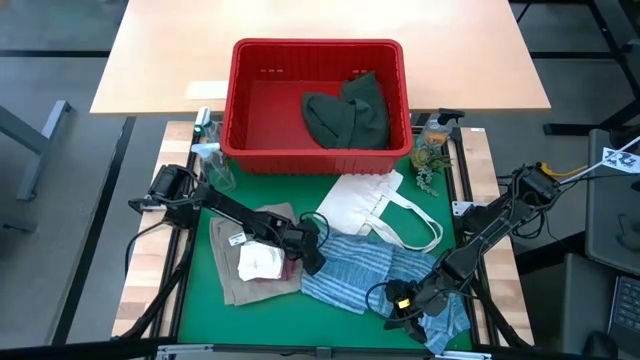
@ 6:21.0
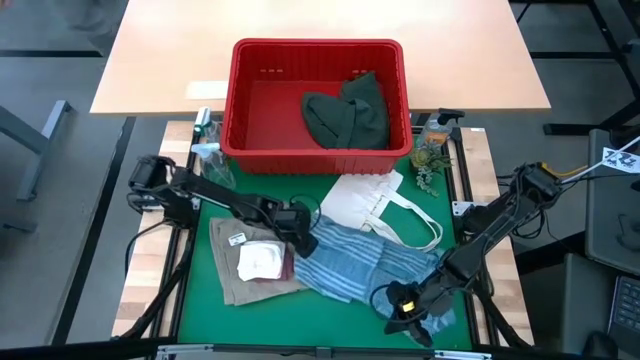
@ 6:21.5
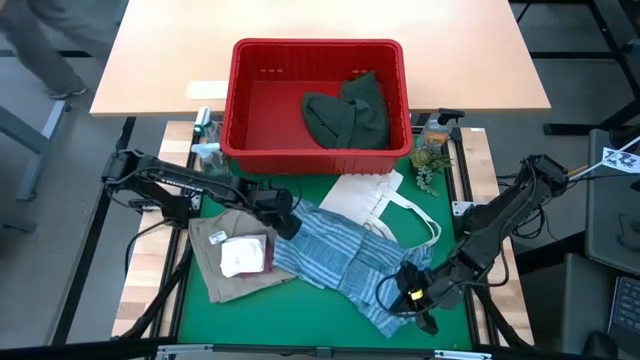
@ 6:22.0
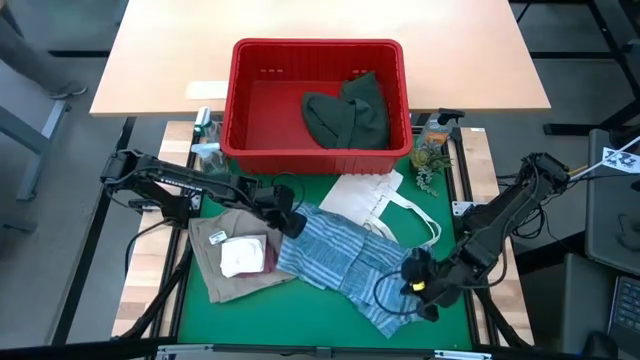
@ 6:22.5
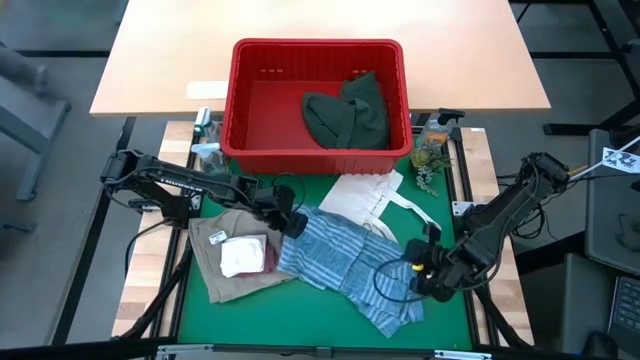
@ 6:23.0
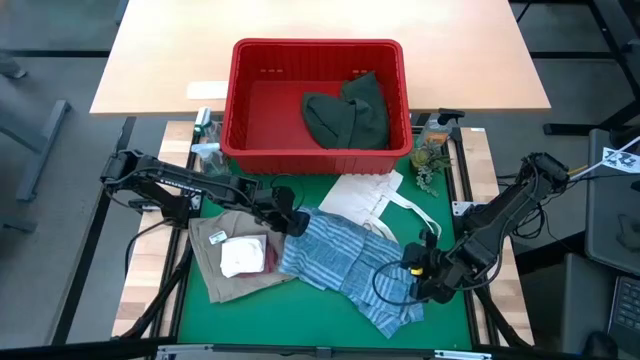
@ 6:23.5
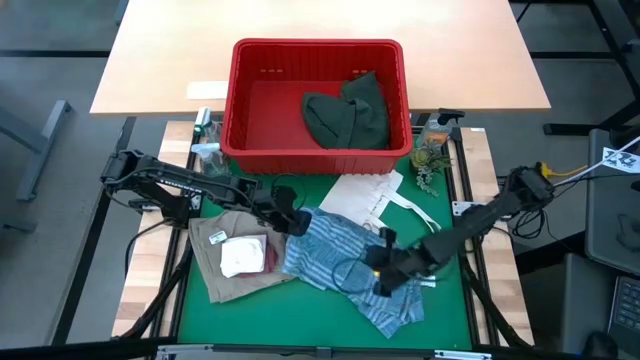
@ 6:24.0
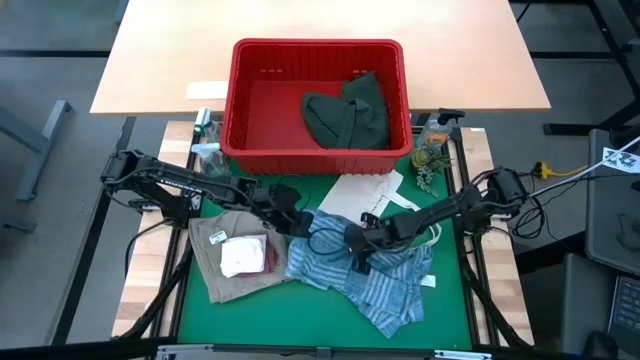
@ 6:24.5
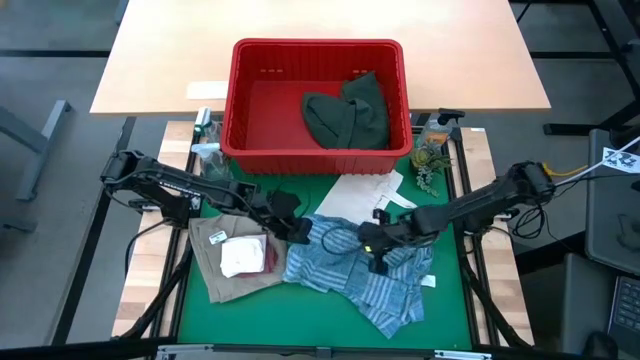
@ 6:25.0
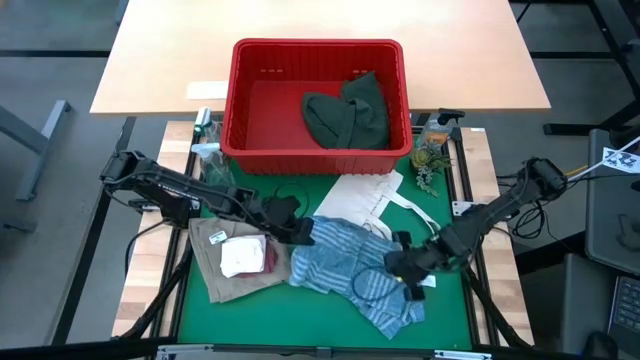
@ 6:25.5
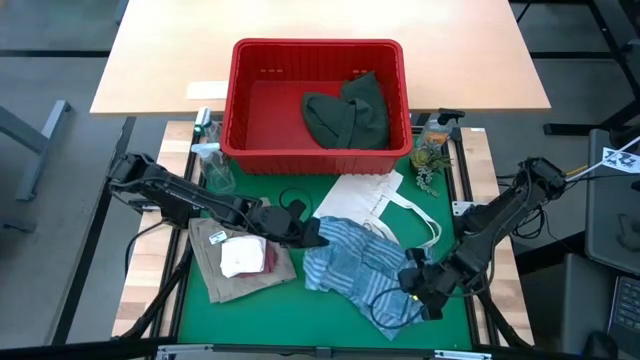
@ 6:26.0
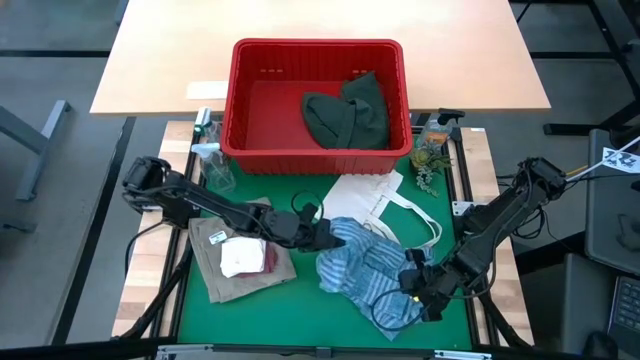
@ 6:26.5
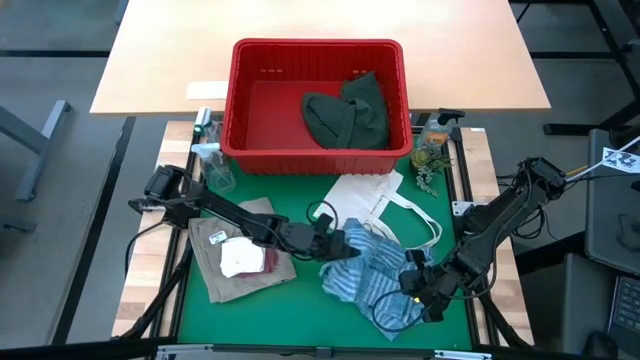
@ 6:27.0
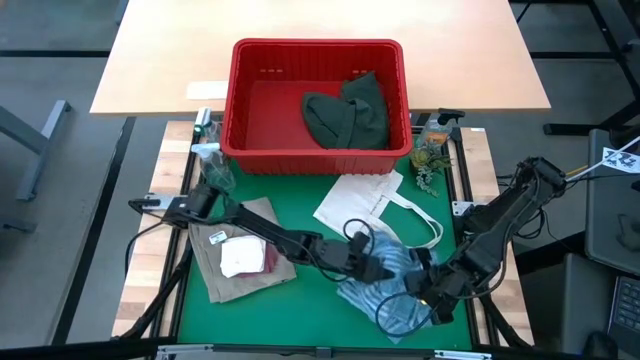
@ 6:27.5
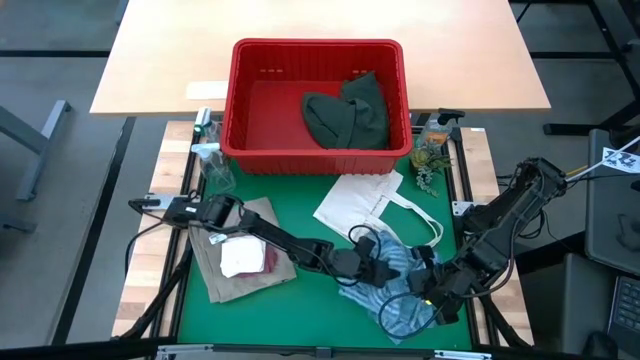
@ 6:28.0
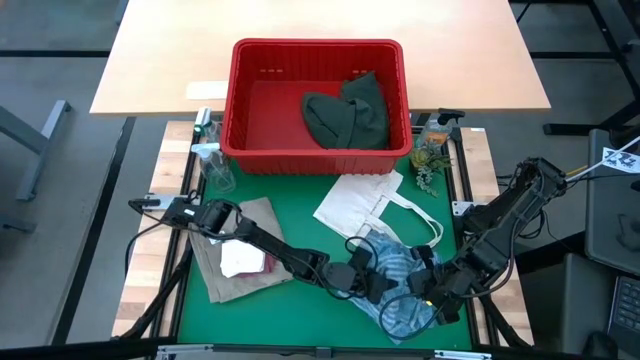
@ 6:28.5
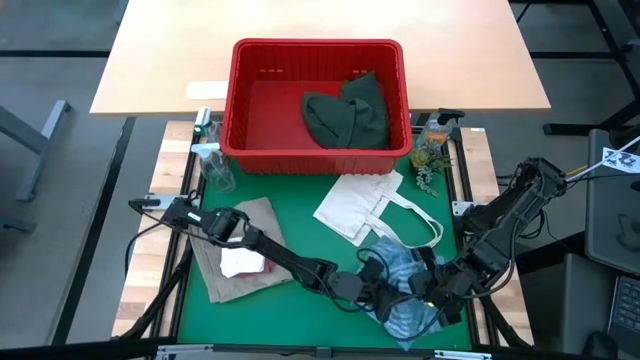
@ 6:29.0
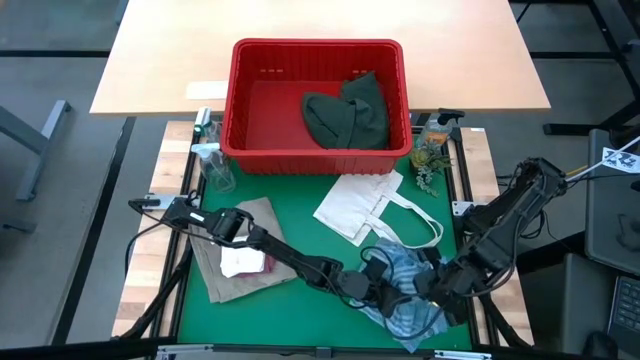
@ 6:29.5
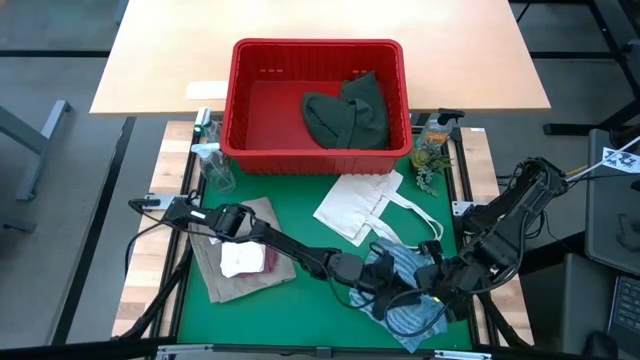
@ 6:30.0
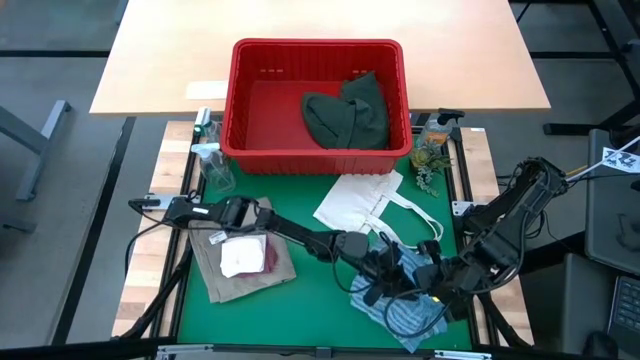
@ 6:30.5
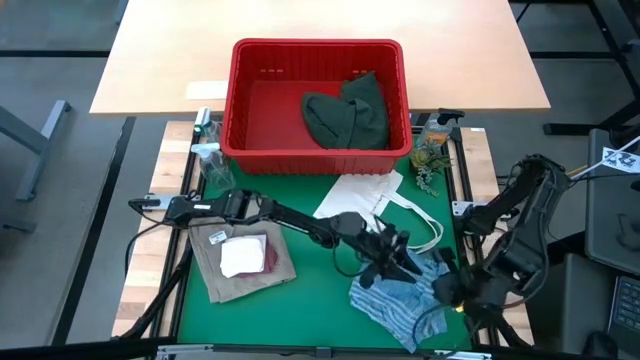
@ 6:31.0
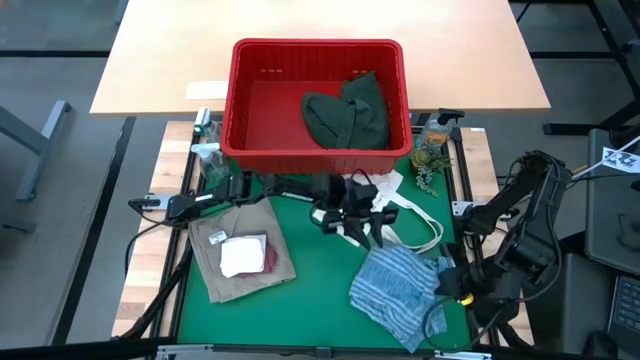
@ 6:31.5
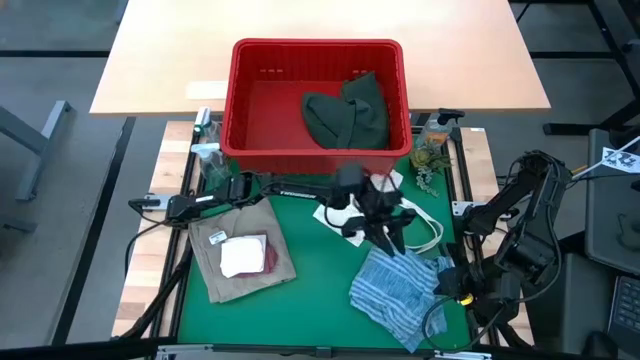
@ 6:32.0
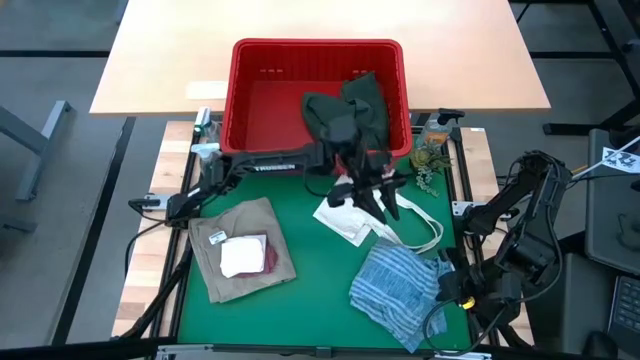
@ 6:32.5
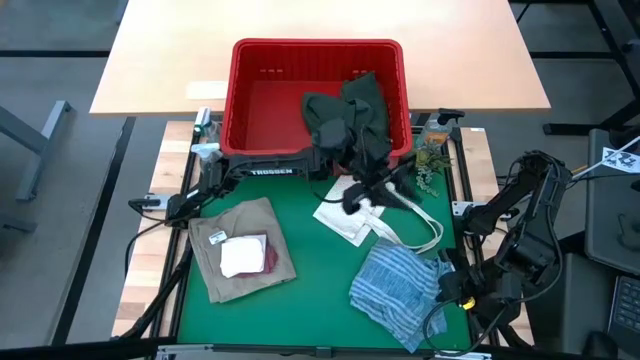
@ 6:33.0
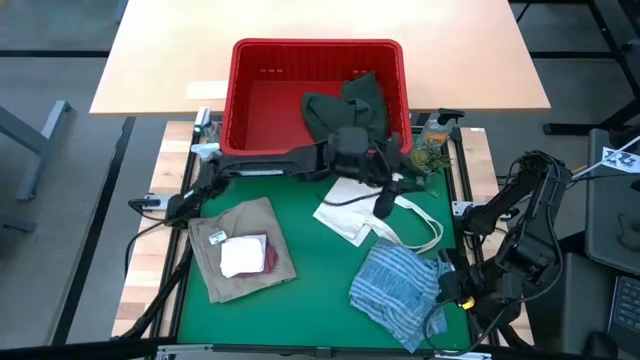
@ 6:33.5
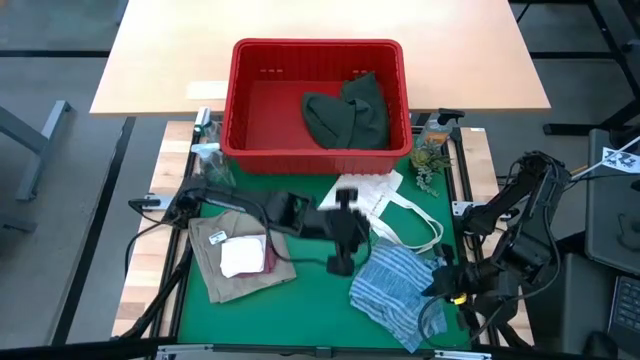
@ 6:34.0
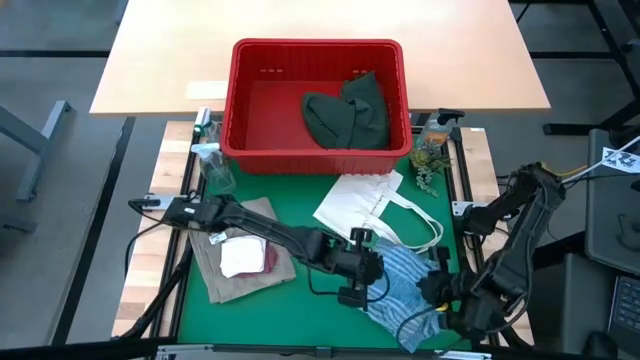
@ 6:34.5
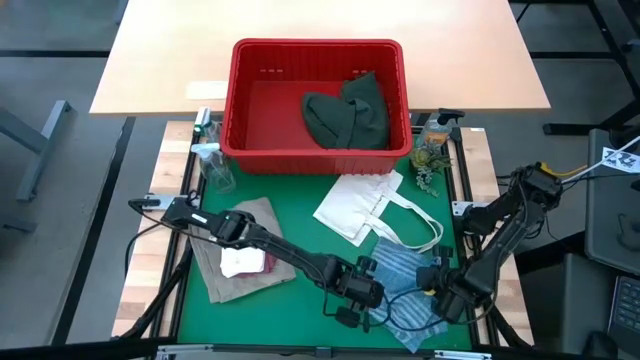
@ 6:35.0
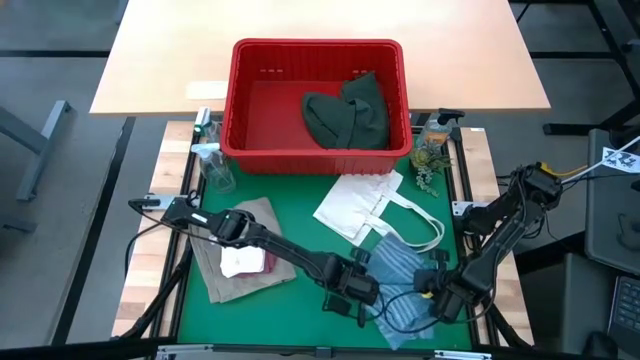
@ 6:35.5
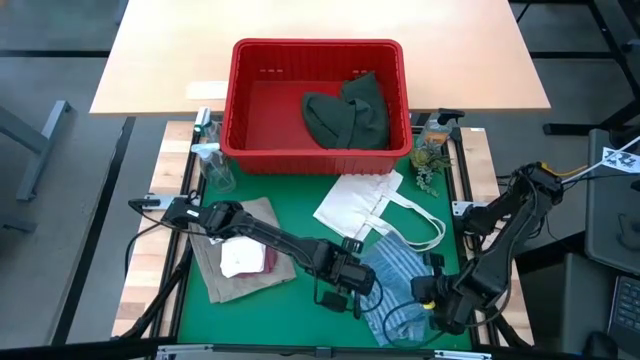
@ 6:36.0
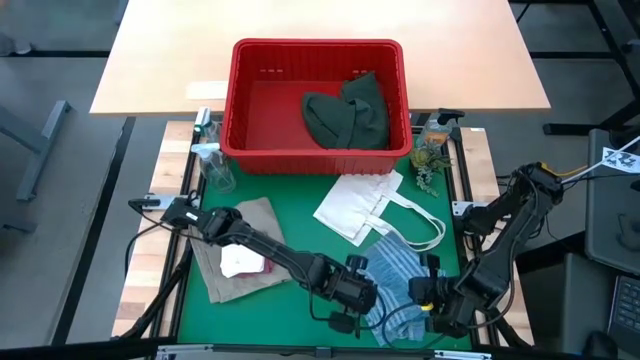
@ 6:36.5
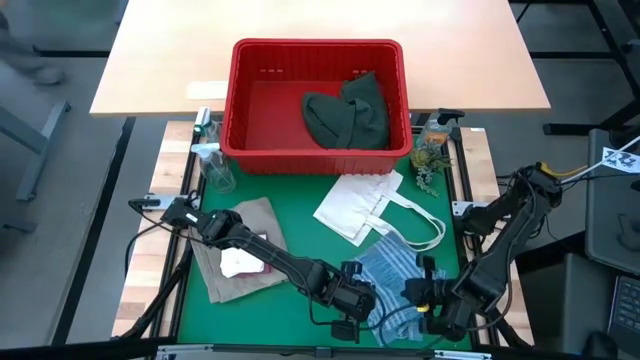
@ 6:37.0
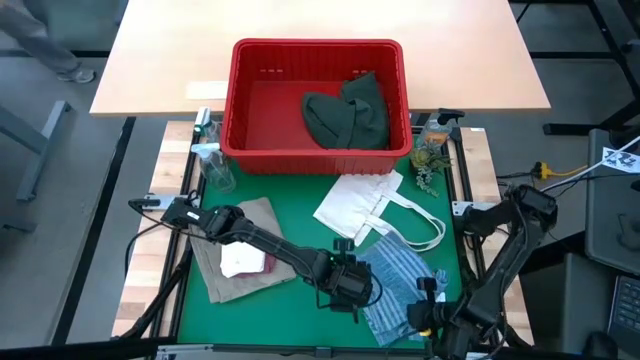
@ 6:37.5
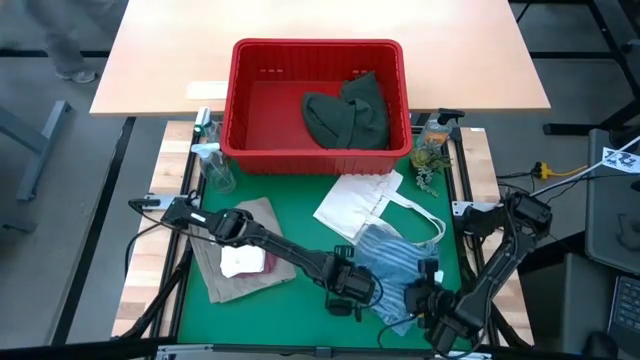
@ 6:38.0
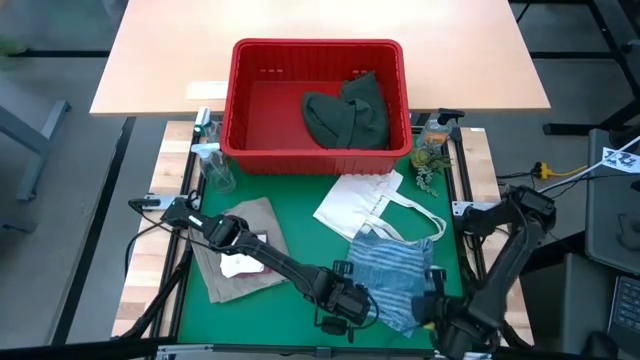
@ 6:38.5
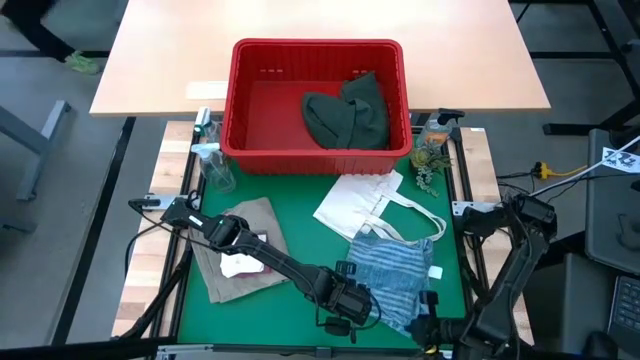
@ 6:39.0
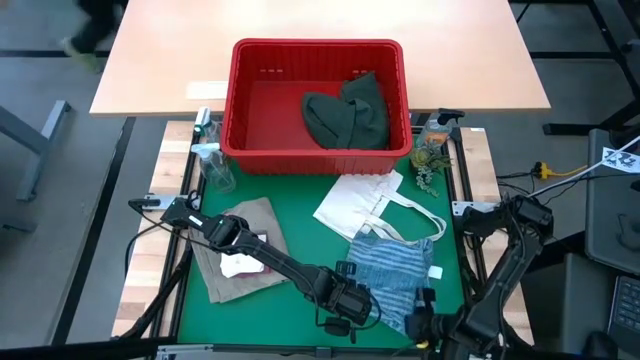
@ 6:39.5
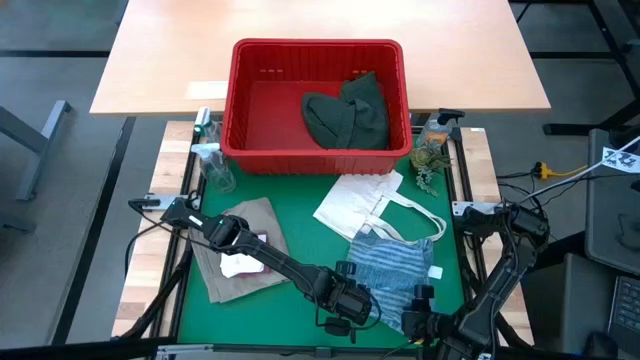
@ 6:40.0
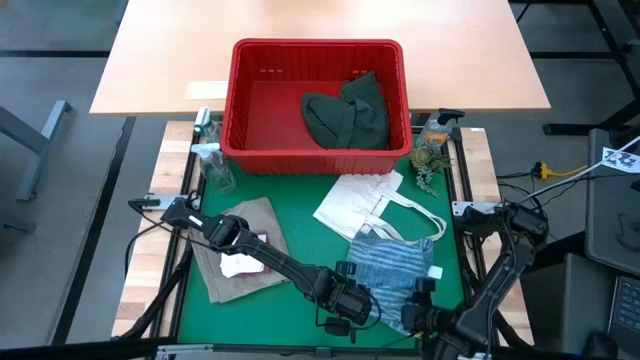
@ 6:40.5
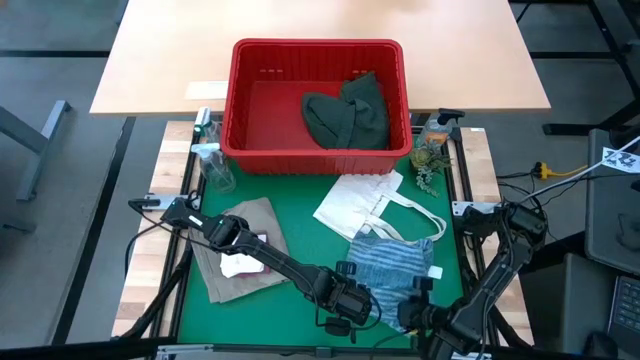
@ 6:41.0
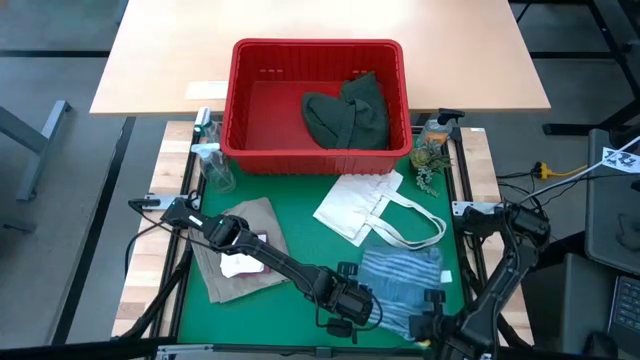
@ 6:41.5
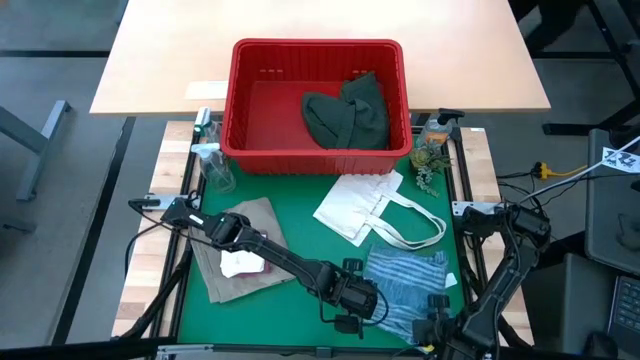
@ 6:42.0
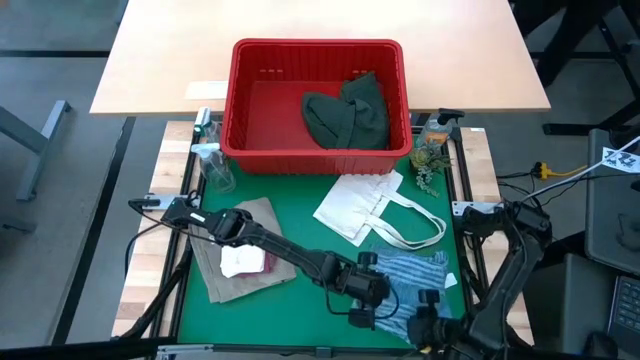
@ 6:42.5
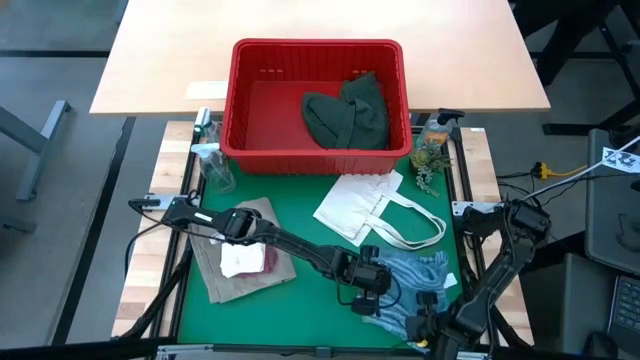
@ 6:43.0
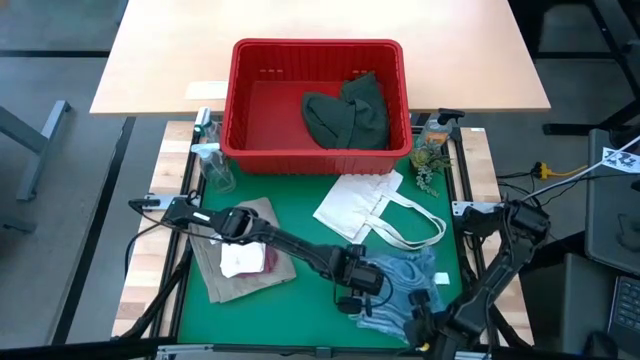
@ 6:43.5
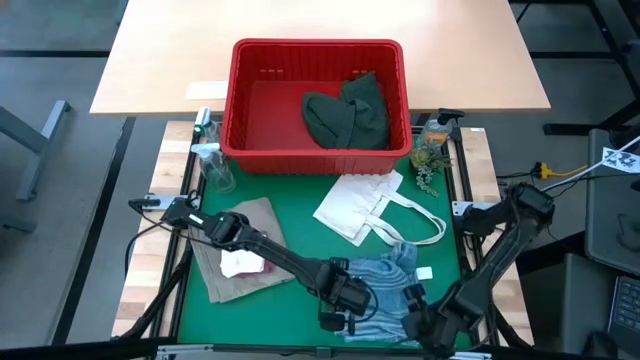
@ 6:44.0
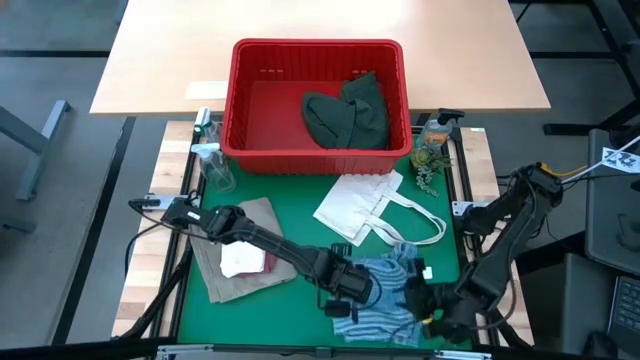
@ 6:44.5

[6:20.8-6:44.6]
Task: Fold Laundry from Bin
Fold the blue polo shirt
